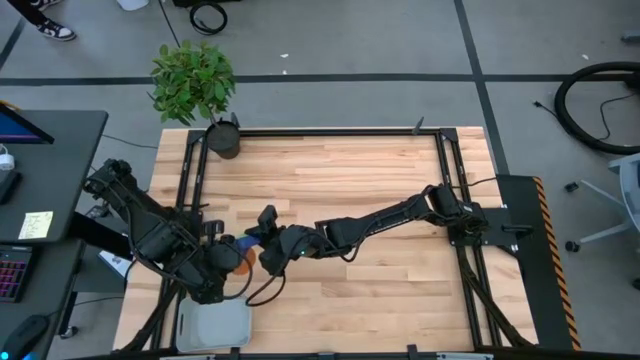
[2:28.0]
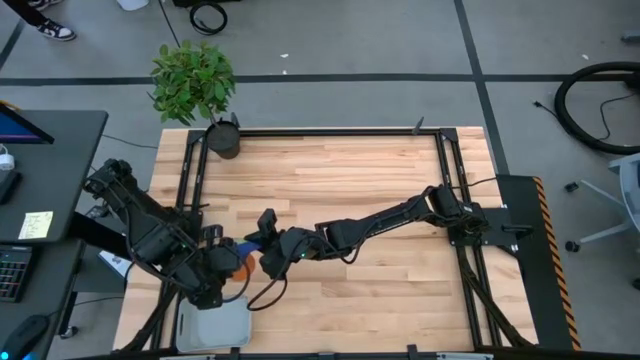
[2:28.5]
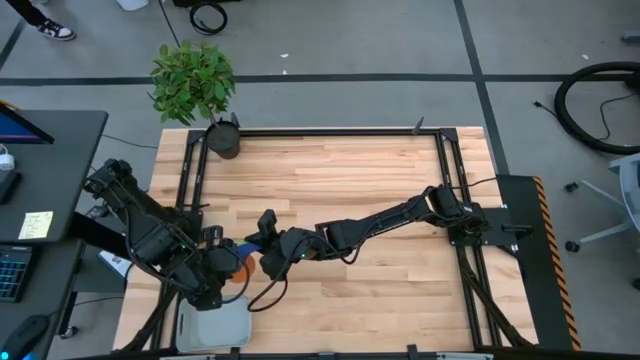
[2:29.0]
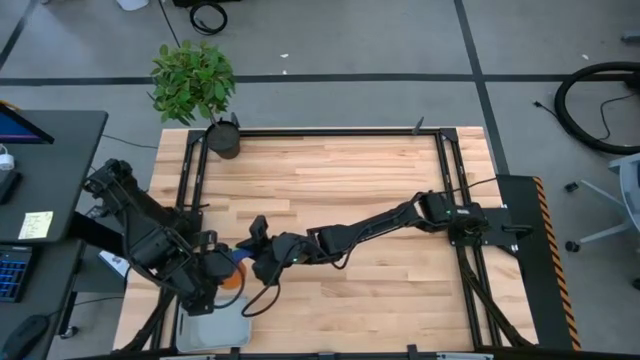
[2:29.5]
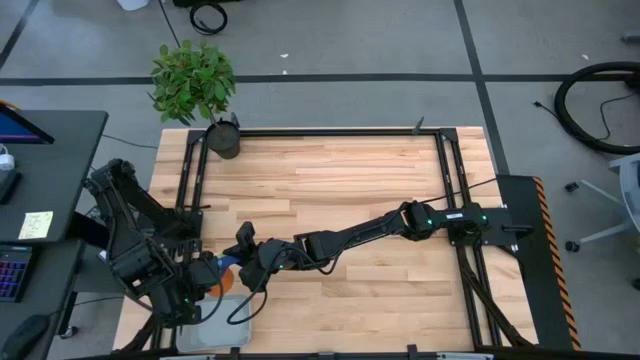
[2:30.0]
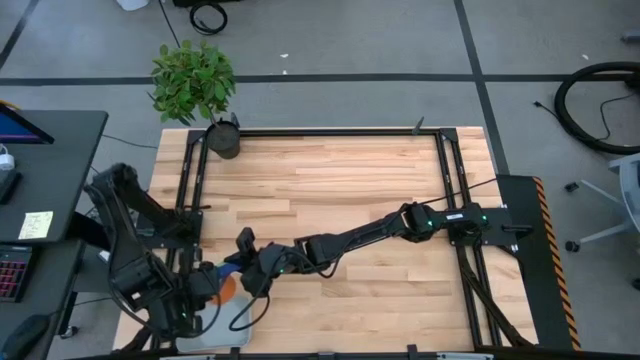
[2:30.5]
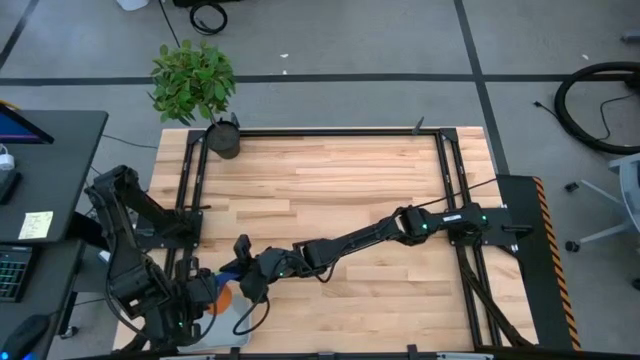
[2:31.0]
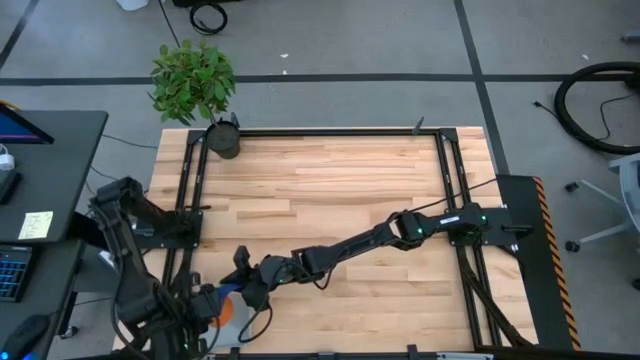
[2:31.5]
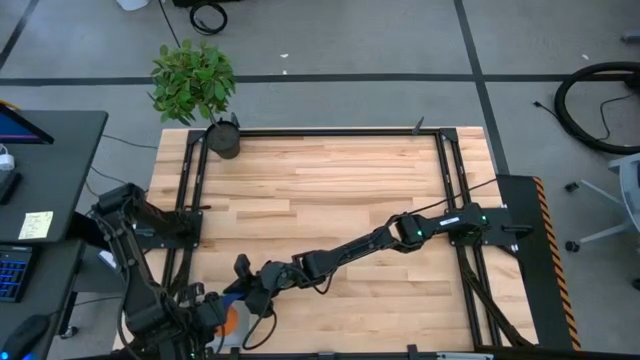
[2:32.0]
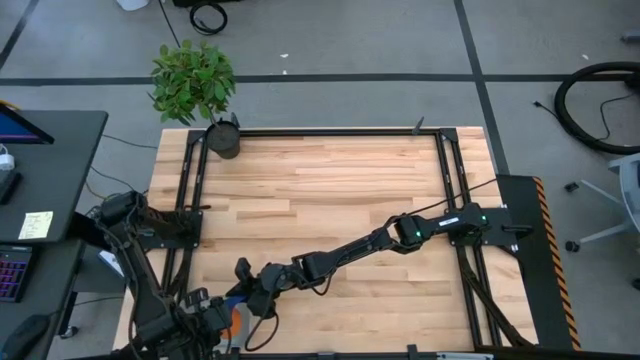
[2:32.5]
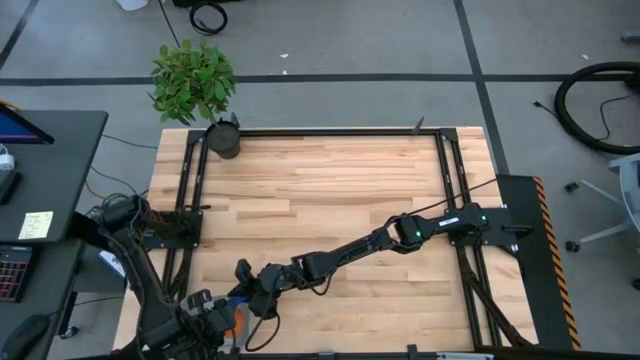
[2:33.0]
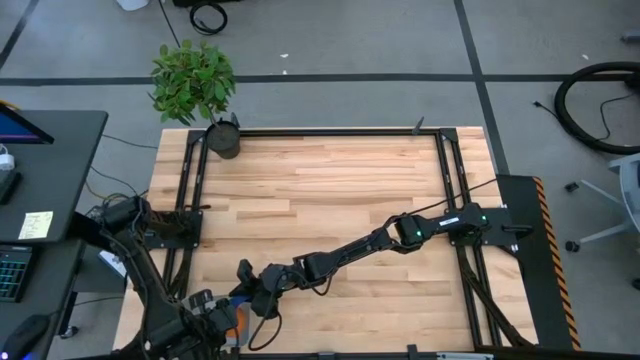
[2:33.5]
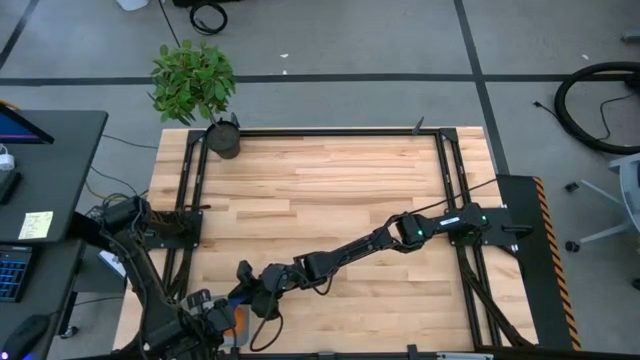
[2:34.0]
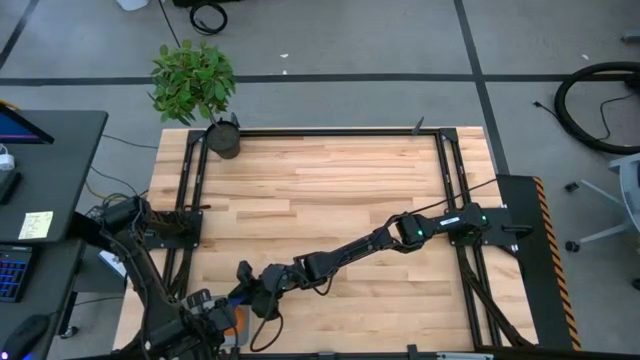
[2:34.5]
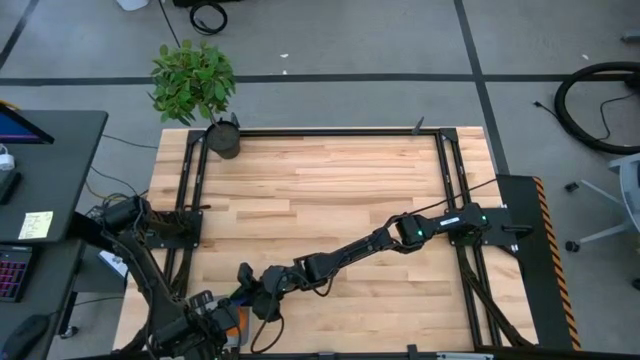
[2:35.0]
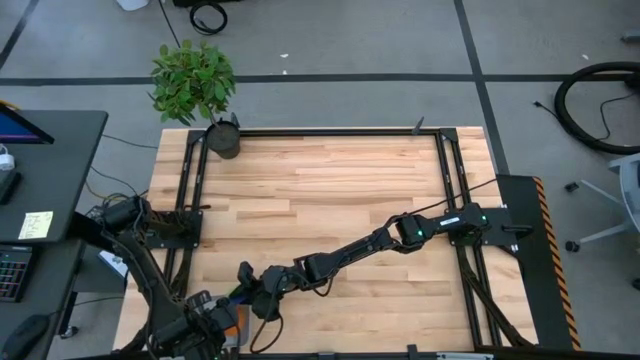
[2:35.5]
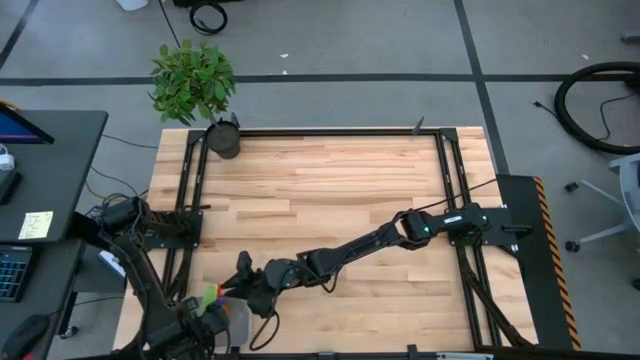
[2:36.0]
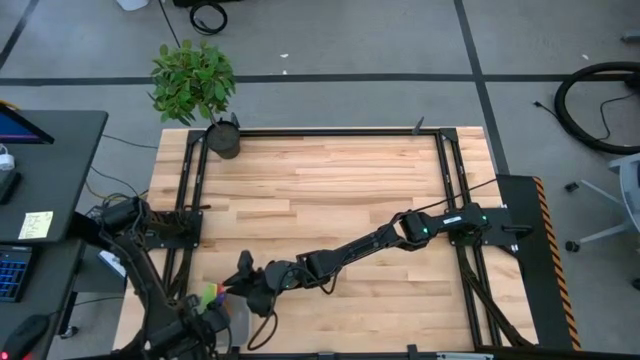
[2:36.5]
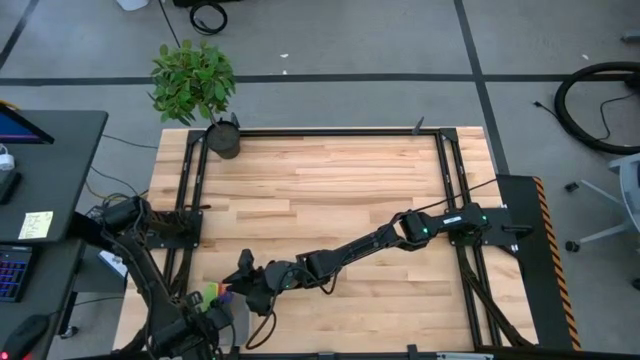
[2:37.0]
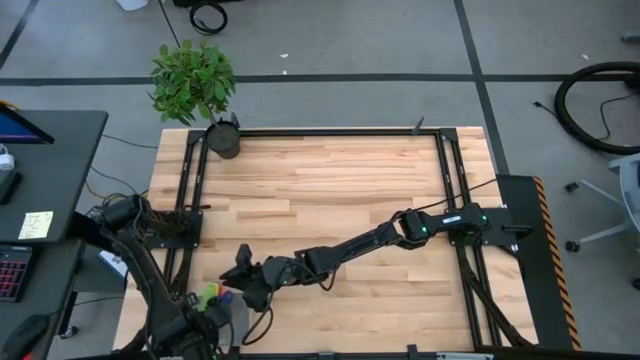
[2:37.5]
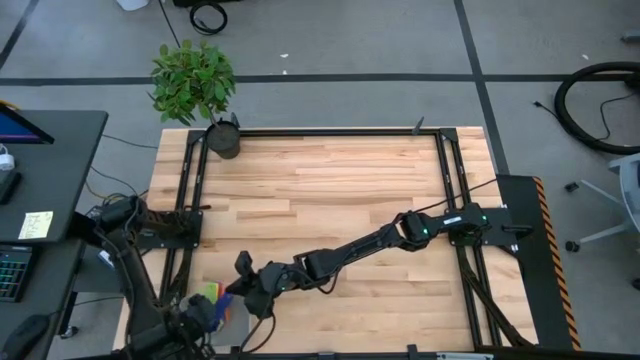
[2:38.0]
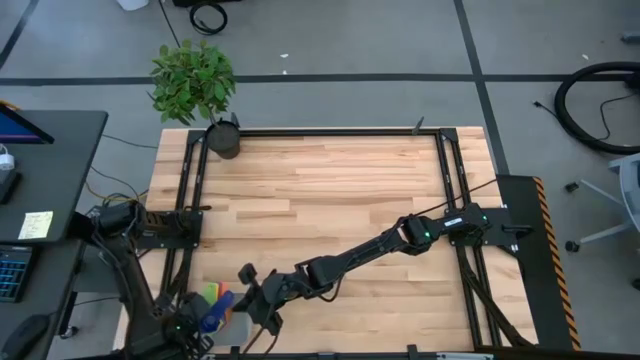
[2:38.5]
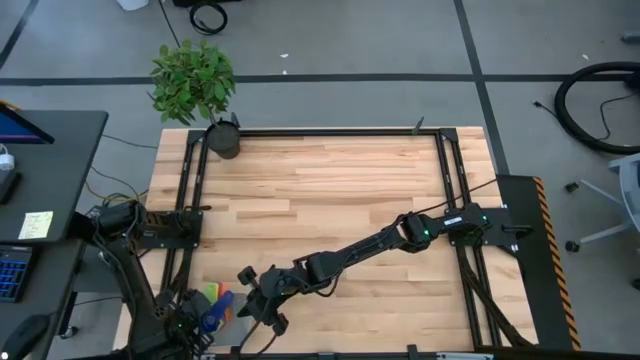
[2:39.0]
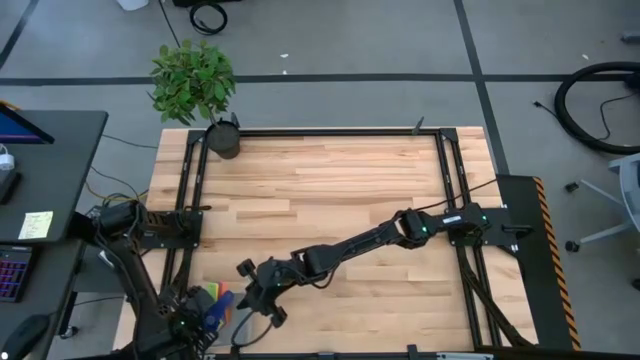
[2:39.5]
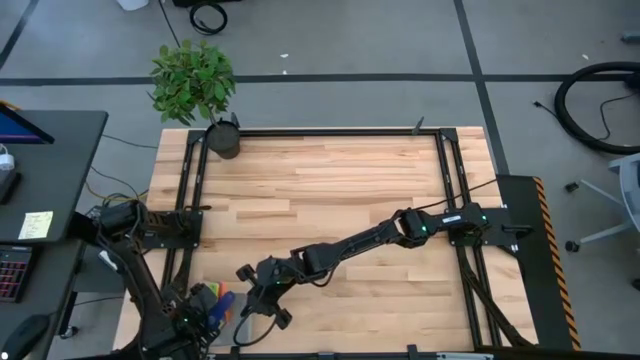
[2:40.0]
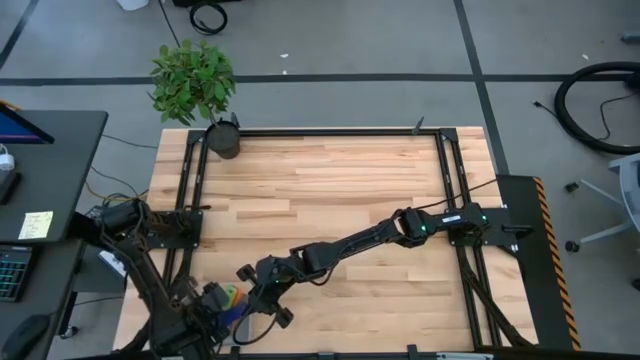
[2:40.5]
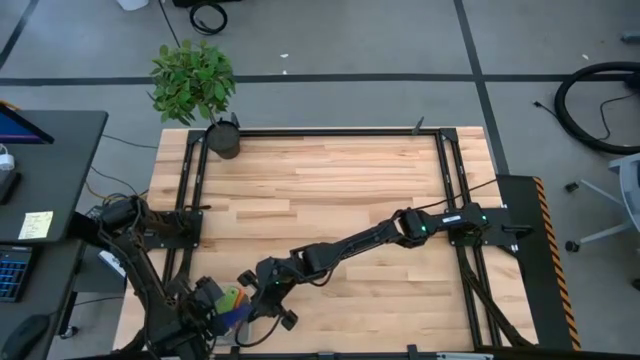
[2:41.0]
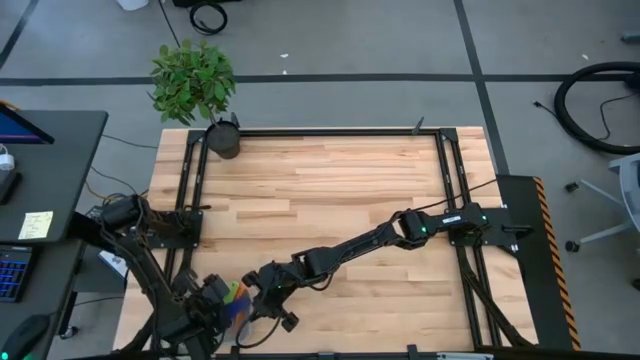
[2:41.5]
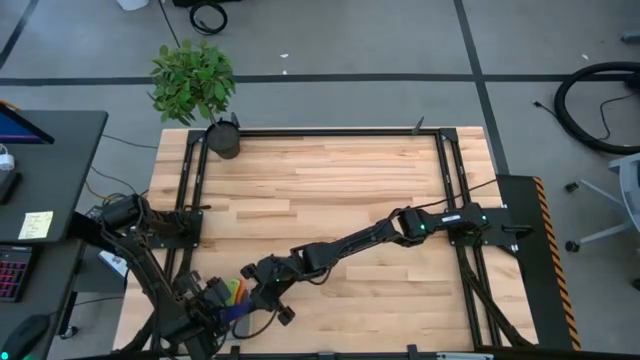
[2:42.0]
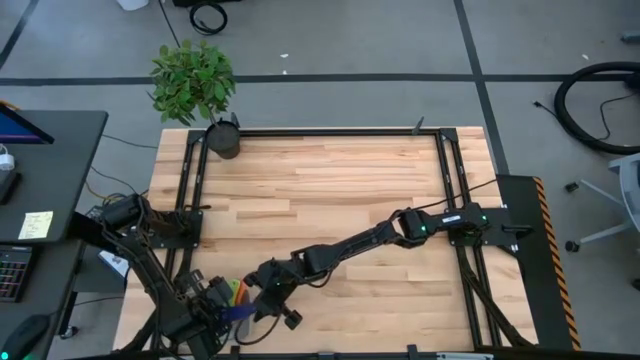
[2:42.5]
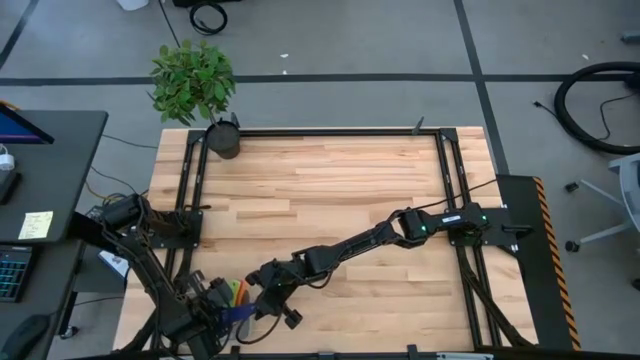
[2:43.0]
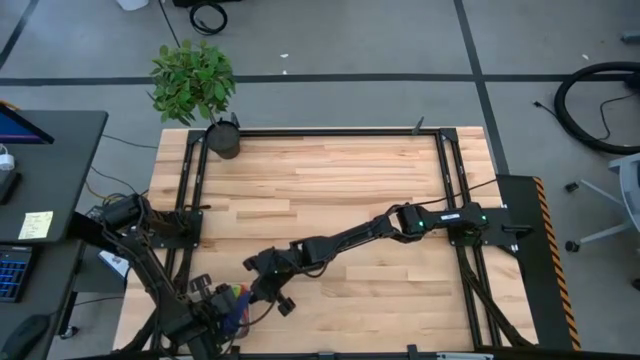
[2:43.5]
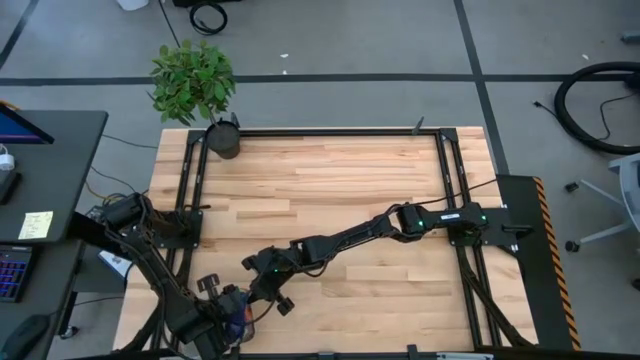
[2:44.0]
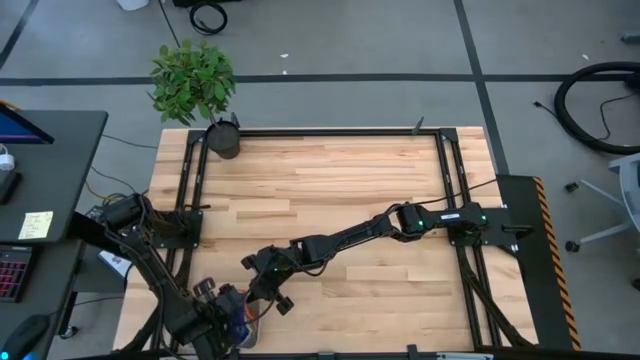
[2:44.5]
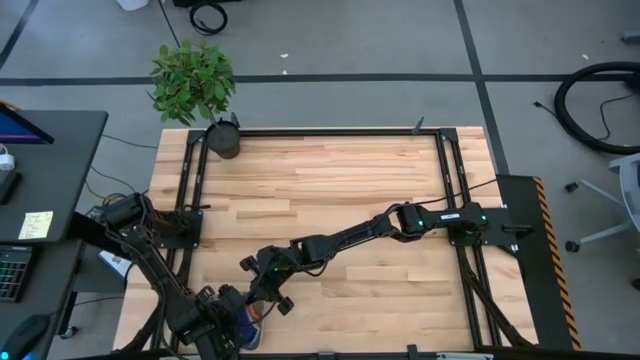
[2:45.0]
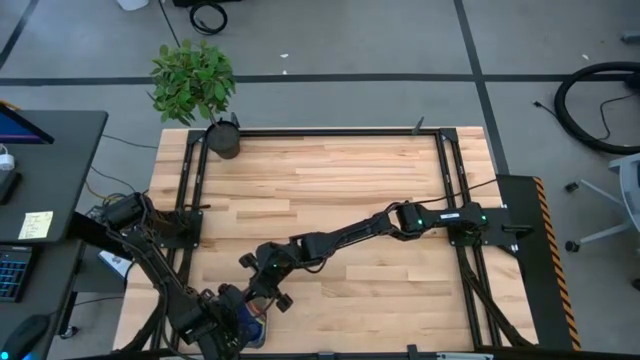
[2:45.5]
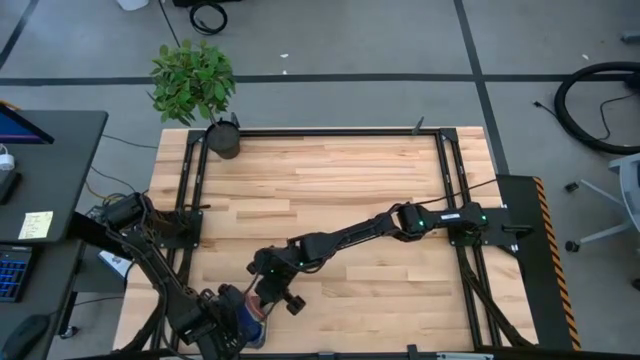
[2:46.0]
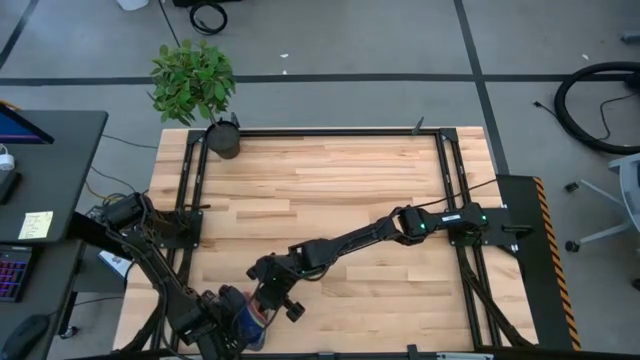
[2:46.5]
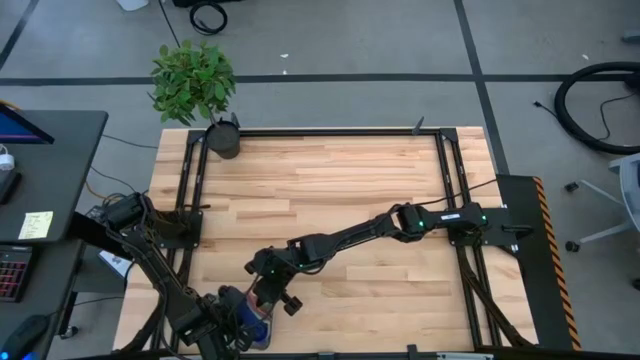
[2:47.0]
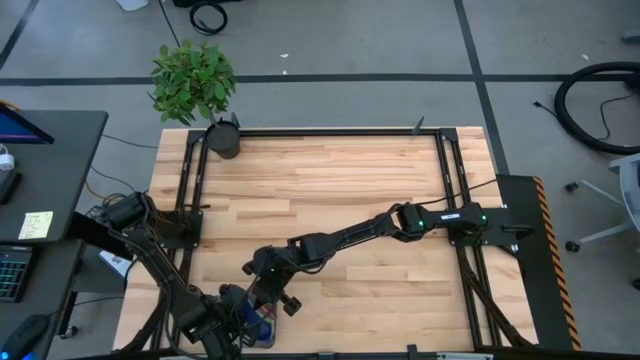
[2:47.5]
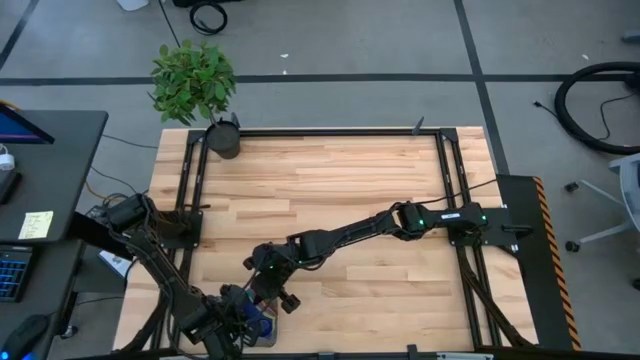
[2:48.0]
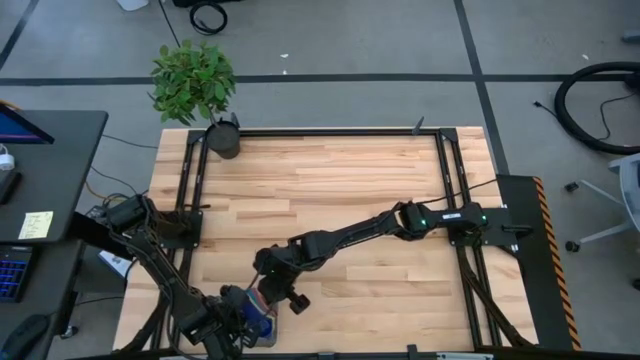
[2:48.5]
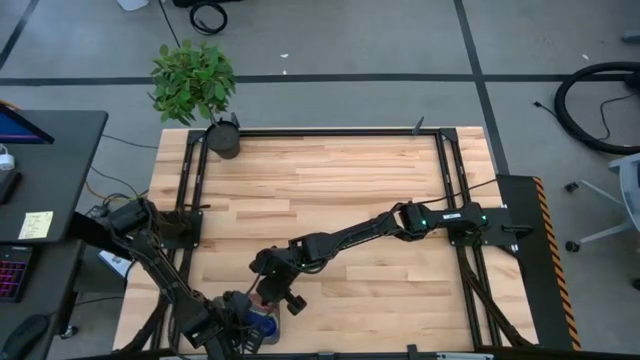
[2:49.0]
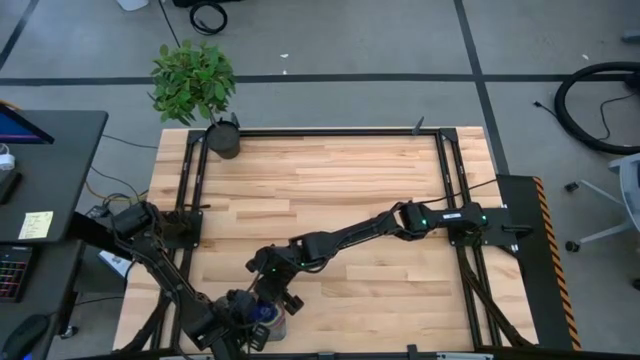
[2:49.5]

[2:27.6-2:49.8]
Task: Nest measuring cups in basket
Put the stacked measuring cups into the gray bin
